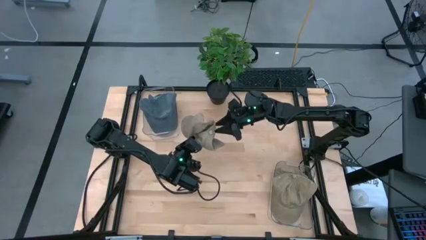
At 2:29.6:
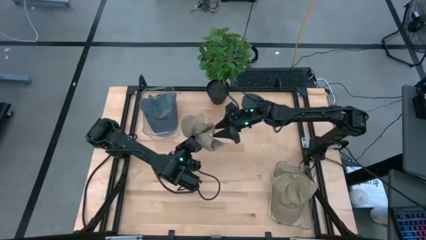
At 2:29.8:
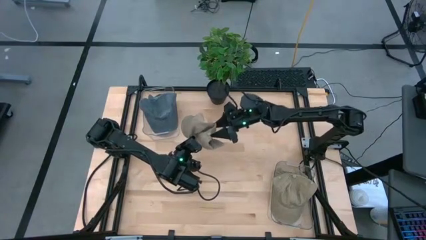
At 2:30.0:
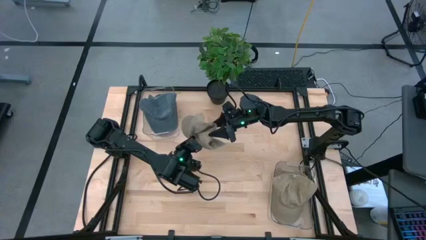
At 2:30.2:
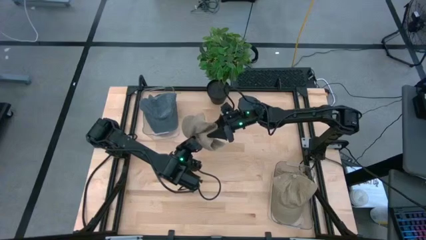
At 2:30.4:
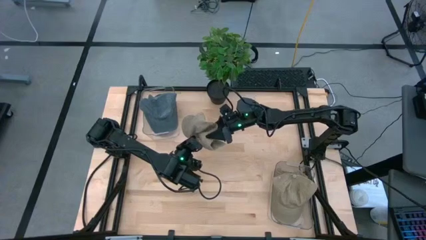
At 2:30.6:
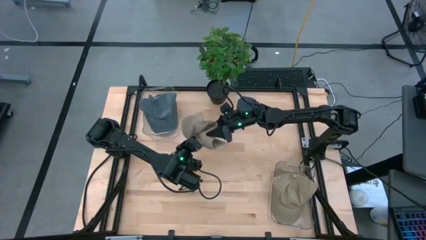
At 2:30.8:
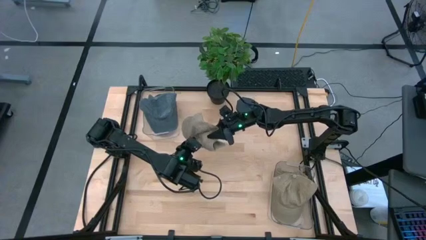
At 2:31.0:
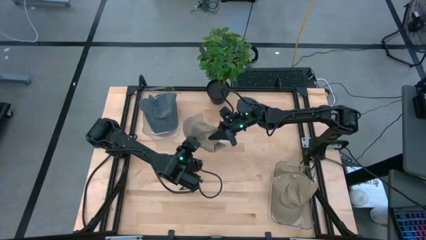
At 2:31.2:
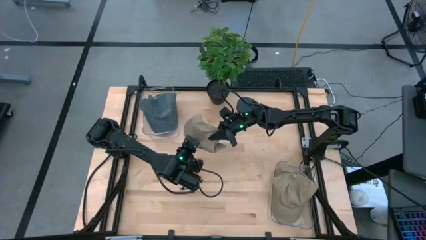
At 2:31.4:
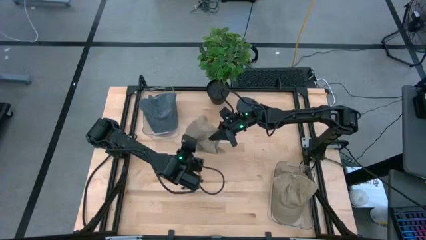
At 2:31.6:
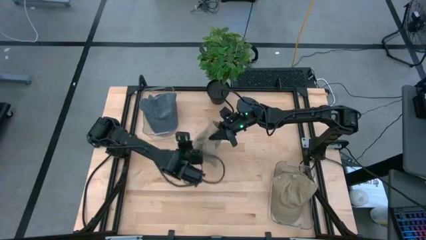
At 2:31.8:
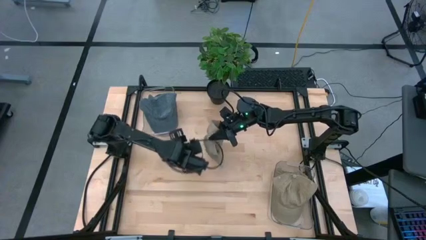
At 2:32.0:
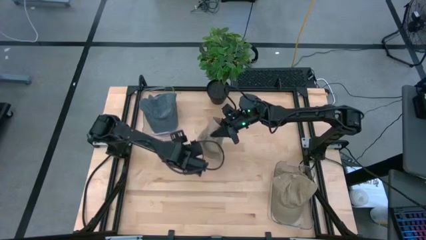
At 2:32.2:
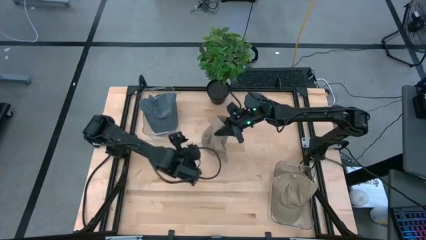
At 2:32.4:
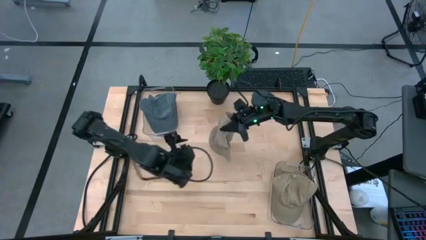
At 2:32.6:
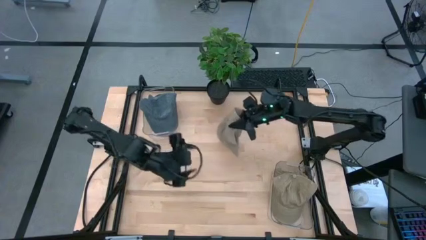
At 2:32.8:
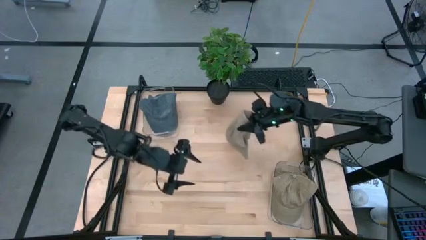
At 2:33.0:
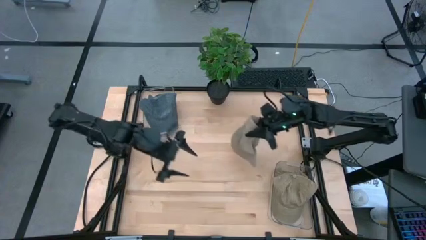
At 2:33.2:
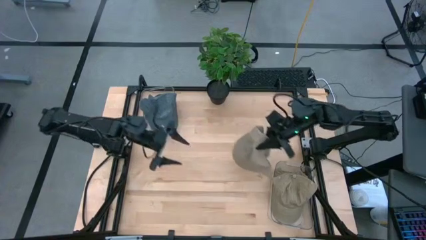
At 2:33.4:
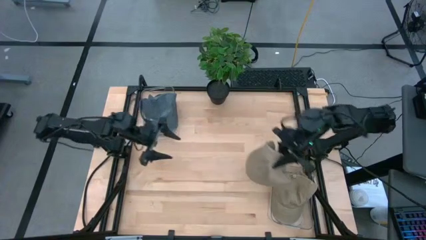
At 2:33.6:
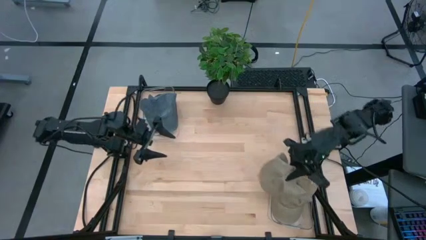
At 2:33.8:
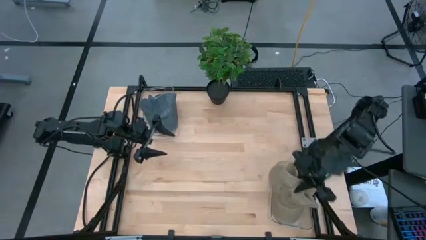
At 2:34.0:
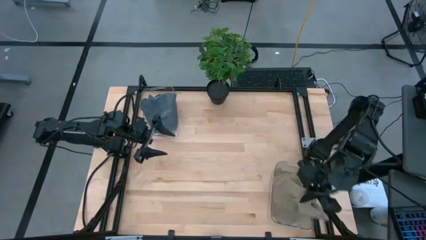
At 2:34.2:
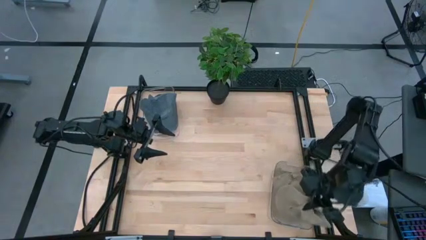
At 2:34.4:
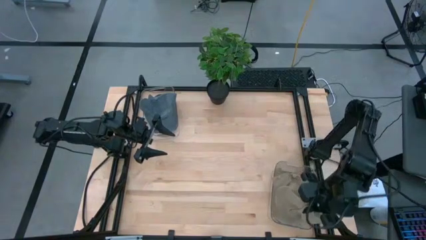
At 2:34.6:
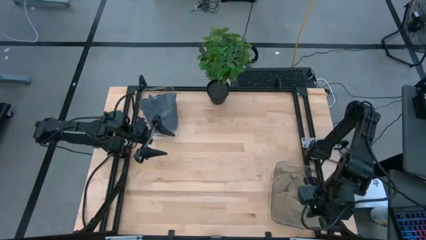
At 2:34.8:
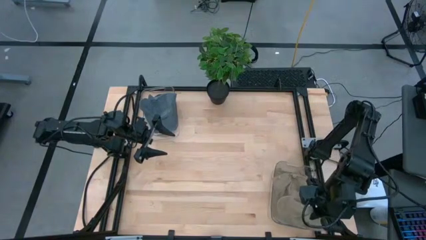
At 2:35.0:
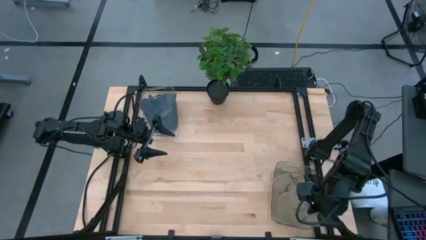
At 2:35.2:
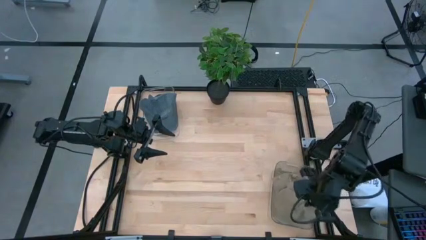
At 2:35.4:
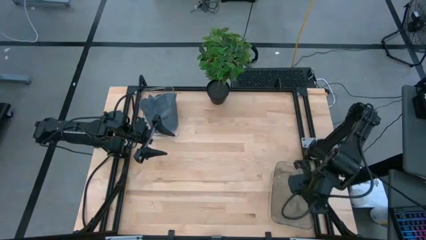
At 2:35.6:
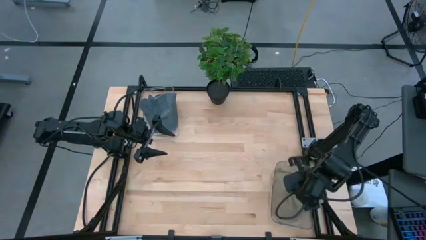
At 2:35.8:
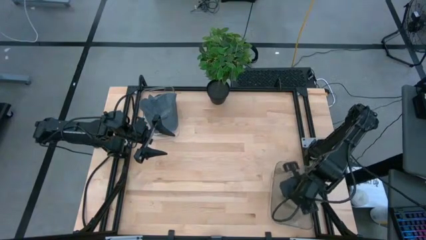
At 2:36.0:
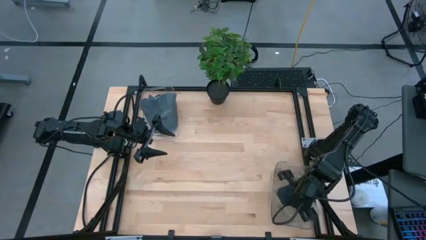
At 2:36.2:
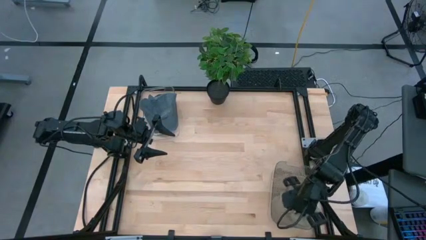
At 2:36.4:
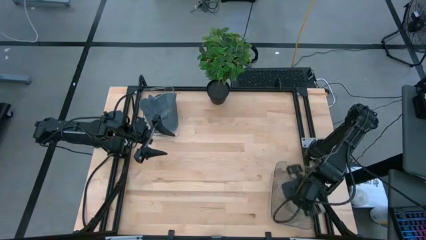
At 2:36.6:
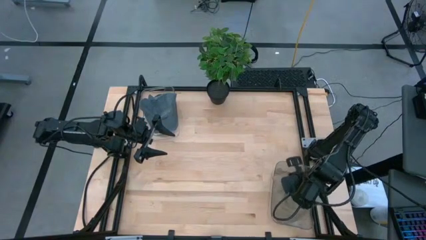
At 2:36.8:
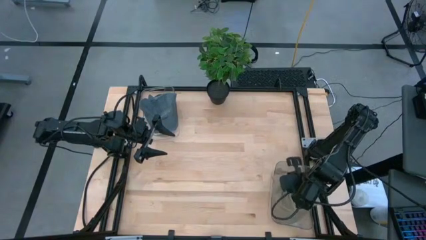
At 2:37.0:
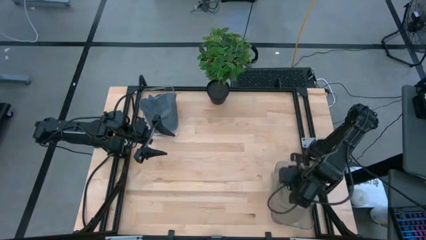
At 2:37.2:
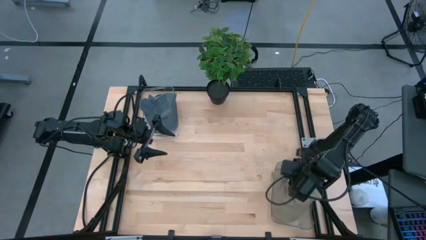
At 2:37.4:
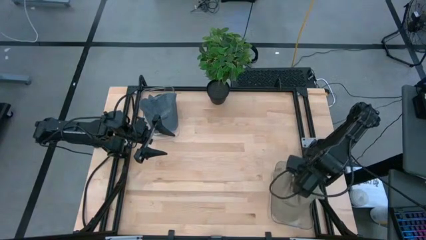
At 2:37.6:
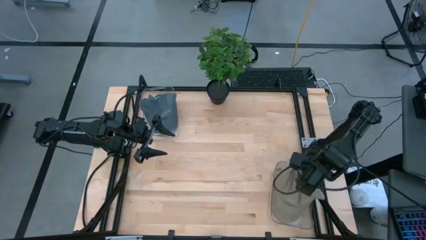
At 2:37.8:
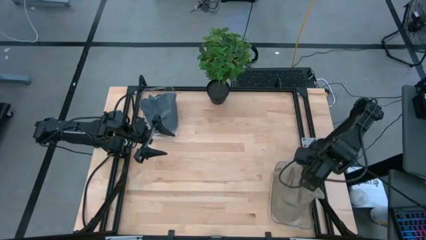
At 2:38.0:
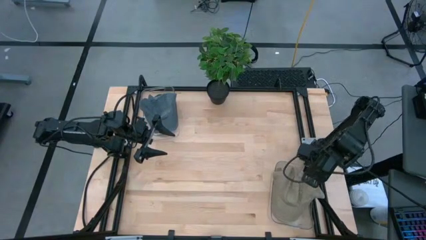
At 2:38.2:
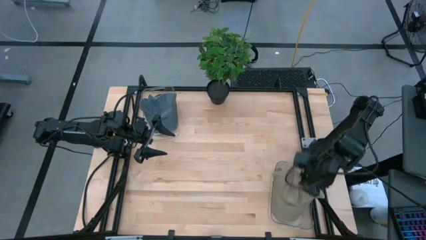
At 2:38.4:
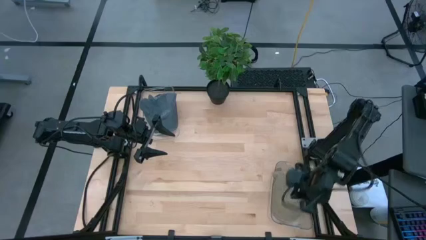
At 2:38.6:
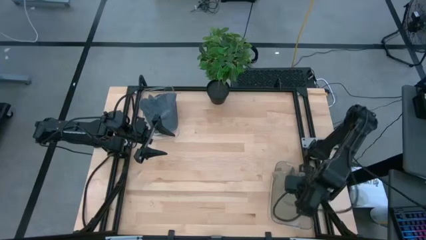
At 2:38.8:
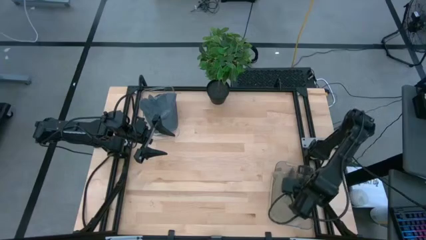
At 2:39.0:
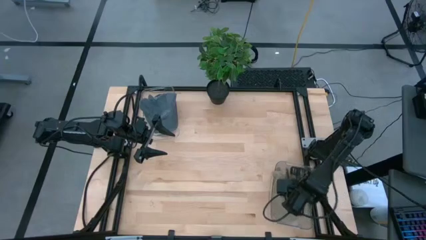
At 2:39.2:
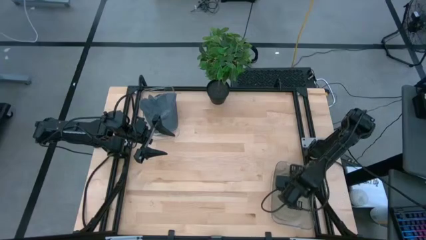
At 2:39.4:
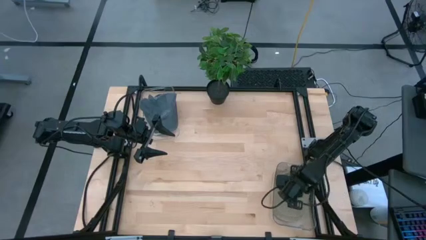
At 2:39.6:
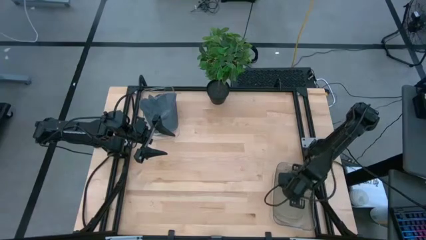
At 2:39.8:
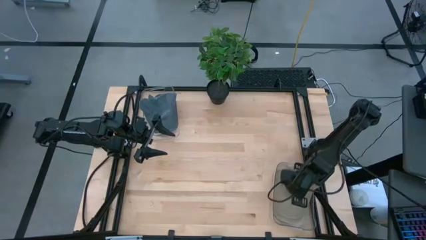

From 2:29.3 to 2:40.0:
Task: Pick & Place hat
Put the brown cap into the right transparent bin

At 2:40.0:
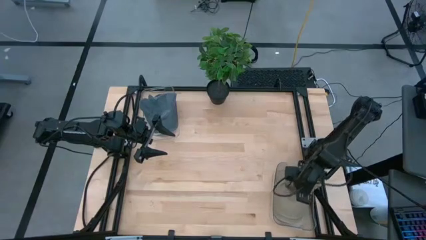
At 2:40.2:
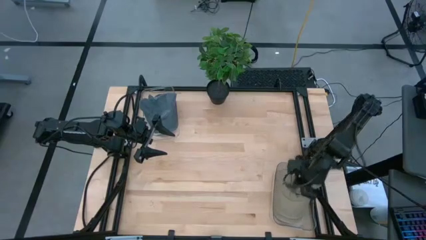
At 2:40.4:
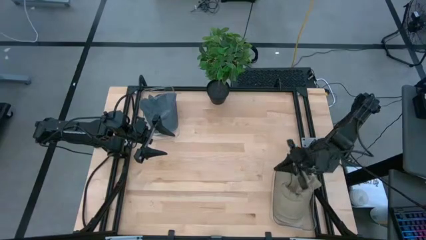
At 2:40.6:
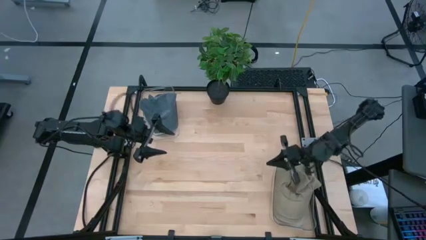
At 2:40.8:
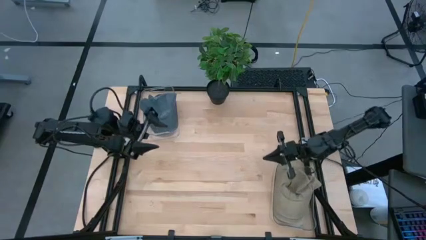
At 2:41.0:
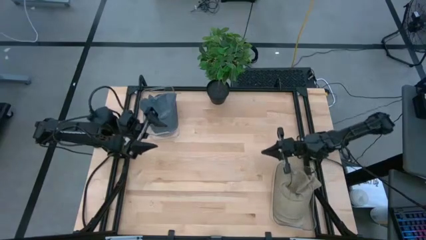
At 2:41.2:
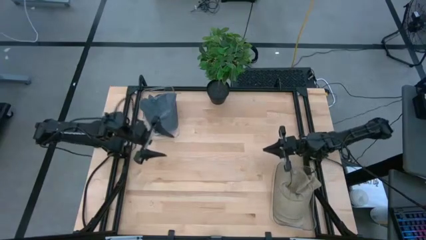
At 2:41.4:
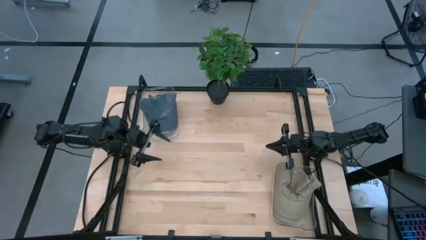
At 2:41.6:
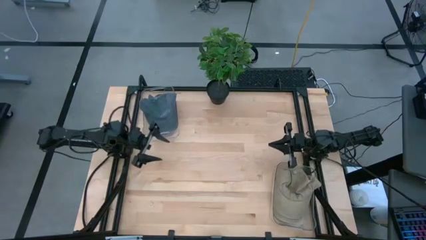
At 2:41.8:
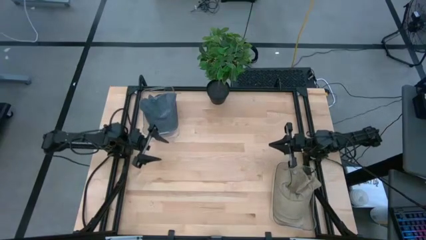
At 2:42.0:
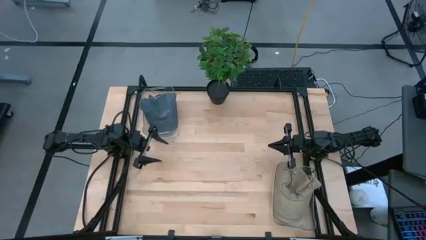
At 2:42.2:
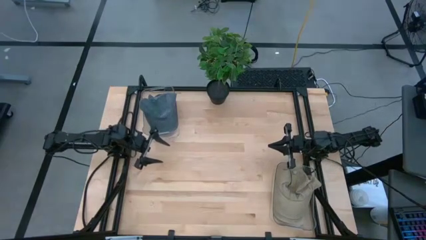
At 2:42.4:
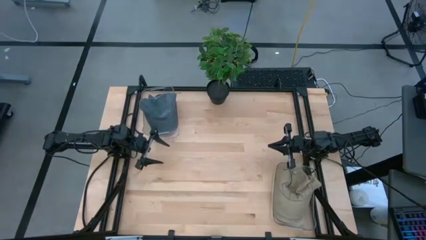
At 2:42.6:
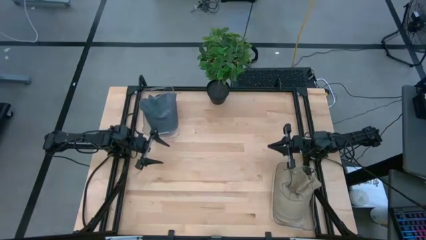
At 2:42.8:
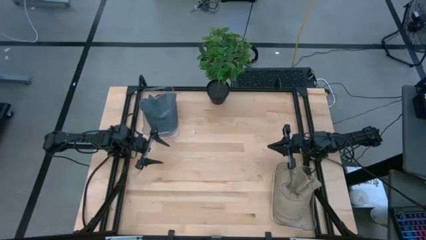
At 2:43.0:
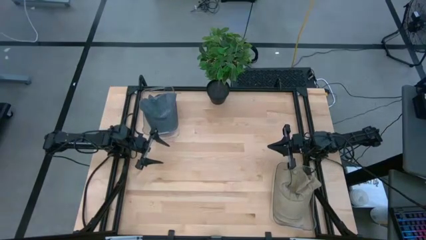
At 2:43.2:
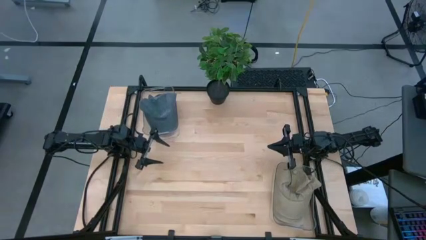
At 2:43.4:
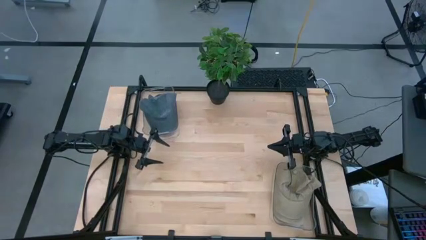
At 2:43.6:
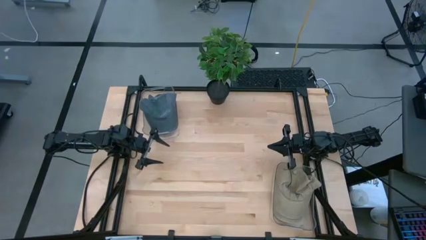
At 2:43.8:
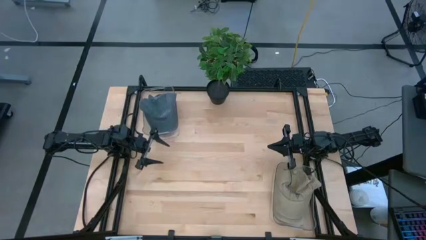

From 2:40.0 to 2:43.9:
Return to Home Position

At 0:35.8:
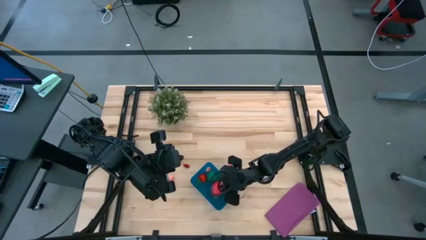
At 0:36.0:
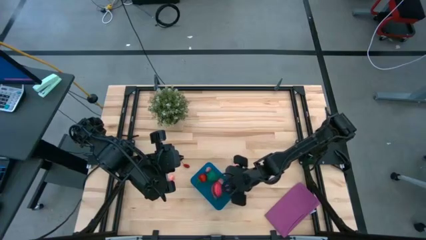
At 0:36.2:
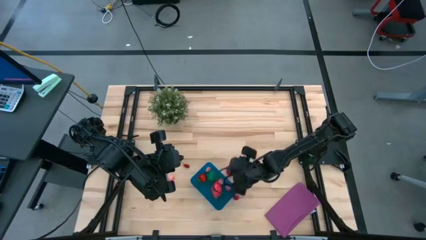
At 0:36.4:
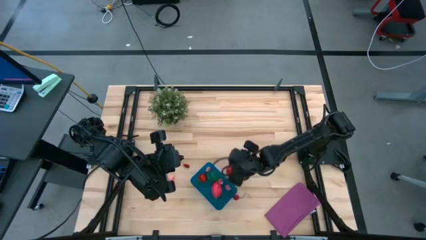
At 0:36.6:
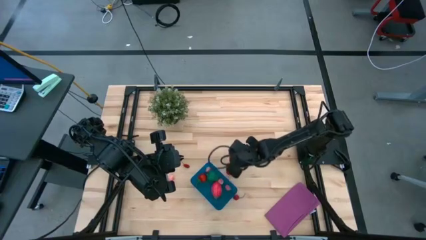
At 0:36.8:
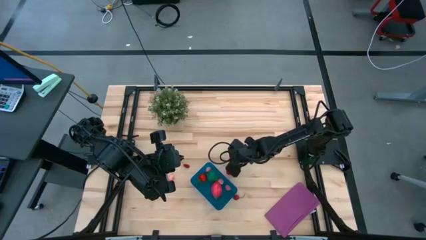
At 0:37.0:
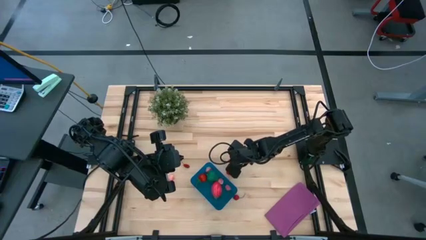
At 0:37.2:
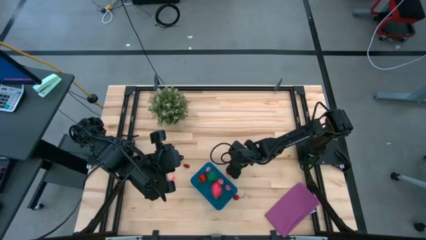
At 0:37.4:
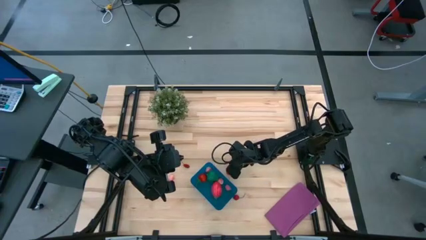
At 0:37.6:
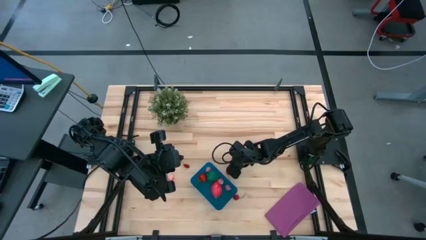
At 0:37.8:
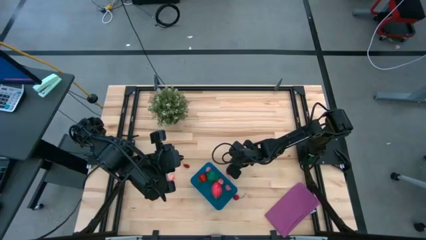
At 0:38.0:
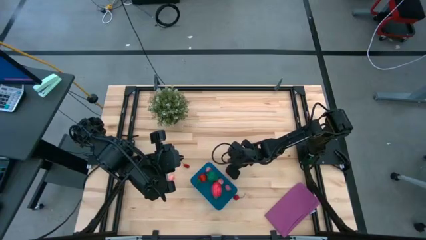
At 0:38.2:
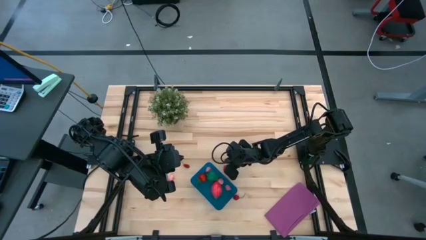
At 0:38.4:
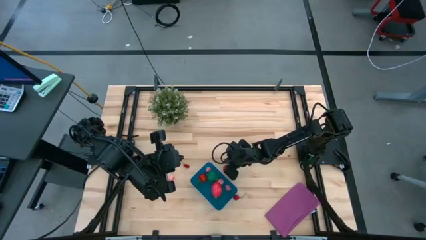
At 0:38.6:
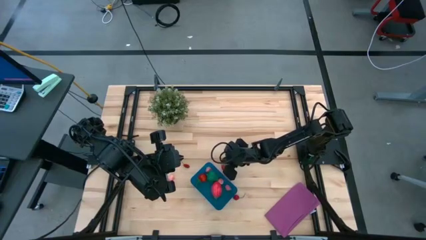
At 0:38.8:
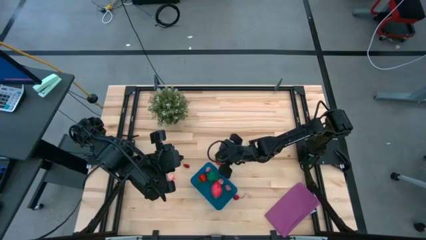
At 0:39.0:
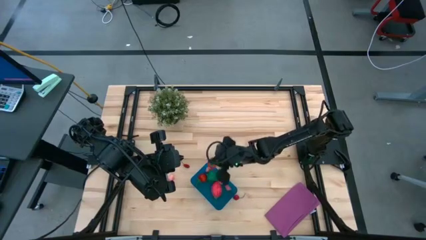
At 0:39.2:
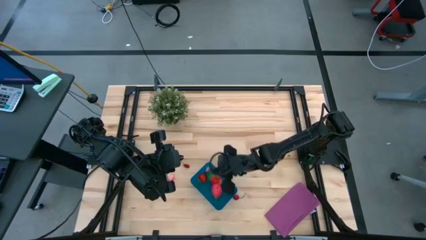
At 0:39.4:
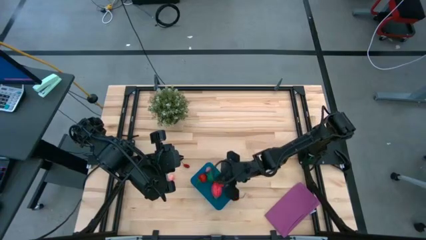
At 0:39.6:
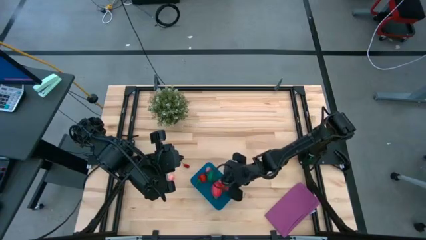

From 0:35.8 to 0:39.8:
Task: Pick and placing Produce into tupperware
Put the red strawberry into the blue bin
